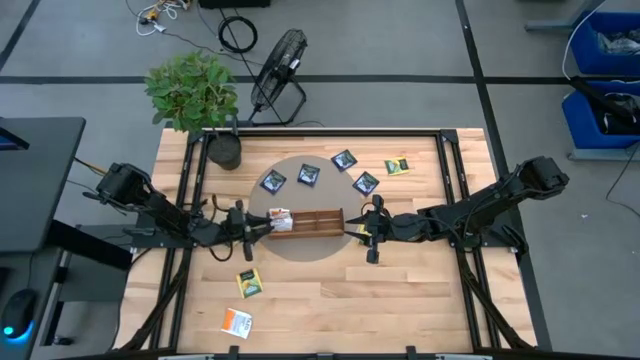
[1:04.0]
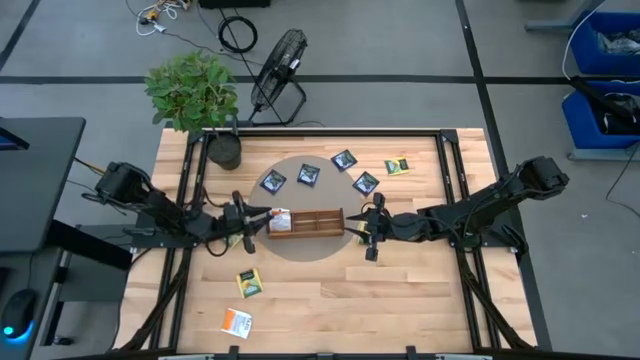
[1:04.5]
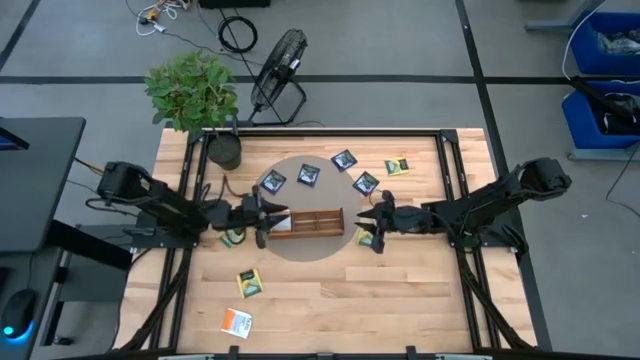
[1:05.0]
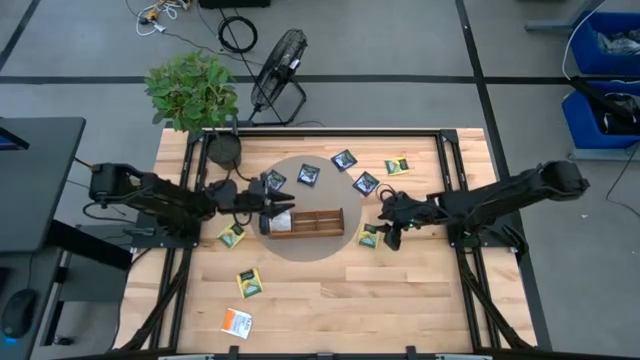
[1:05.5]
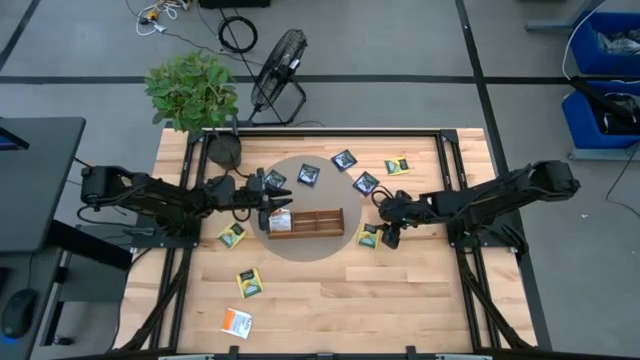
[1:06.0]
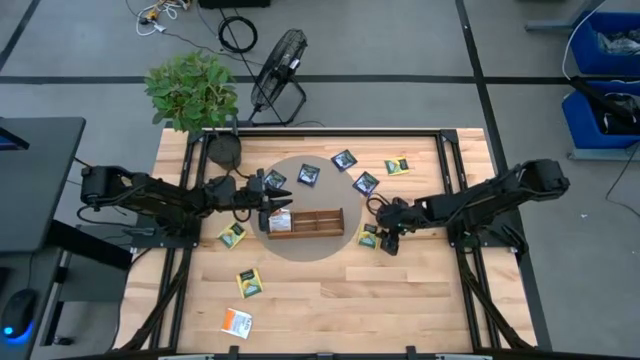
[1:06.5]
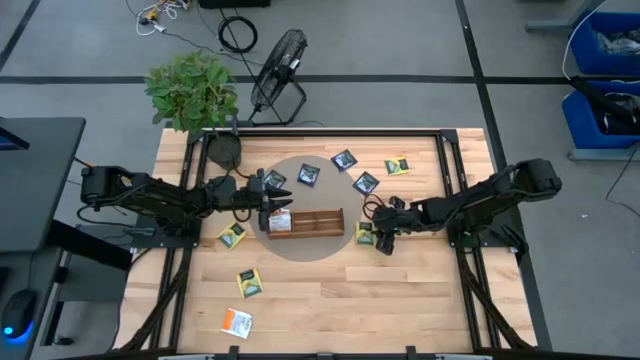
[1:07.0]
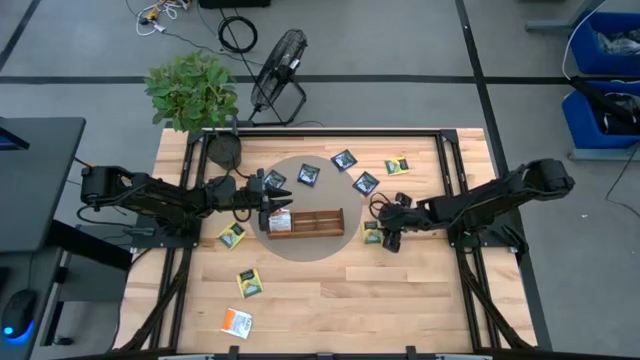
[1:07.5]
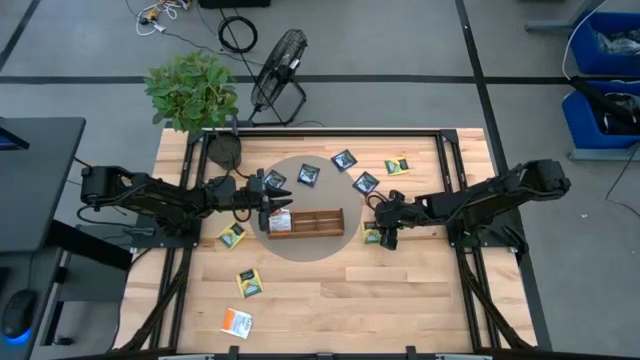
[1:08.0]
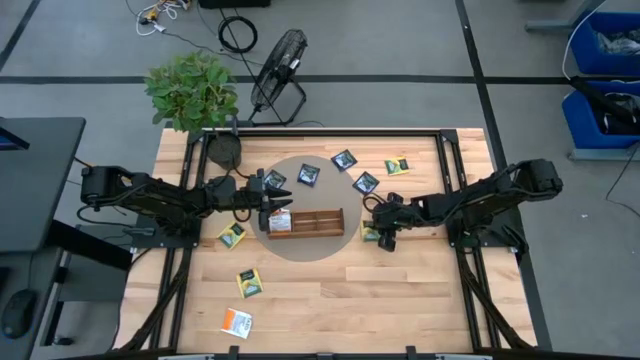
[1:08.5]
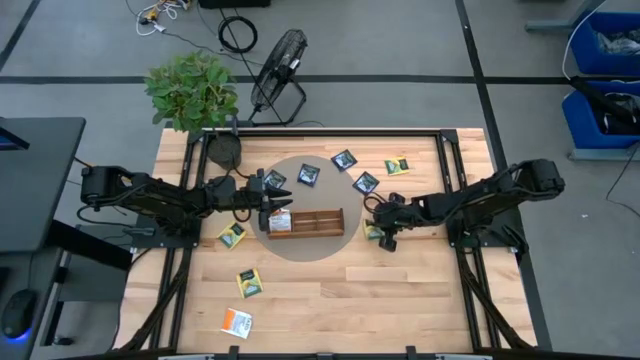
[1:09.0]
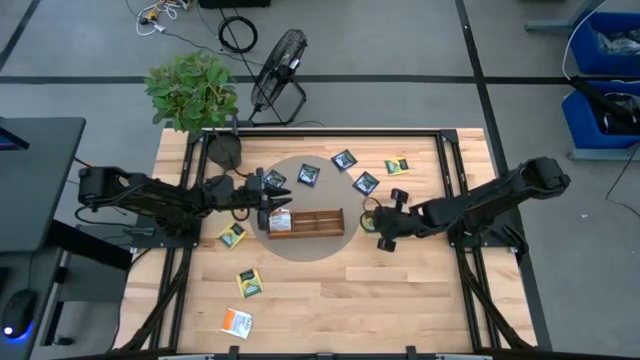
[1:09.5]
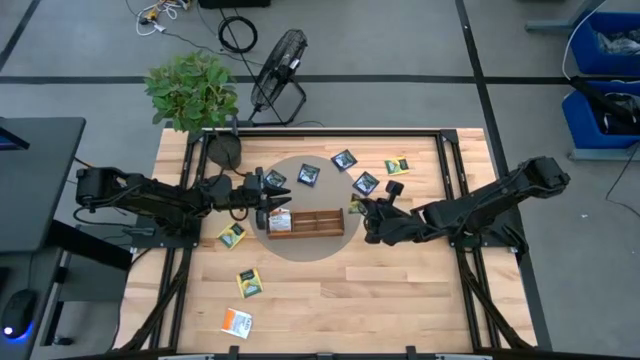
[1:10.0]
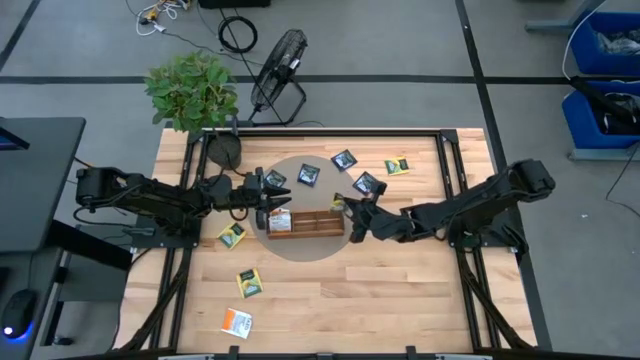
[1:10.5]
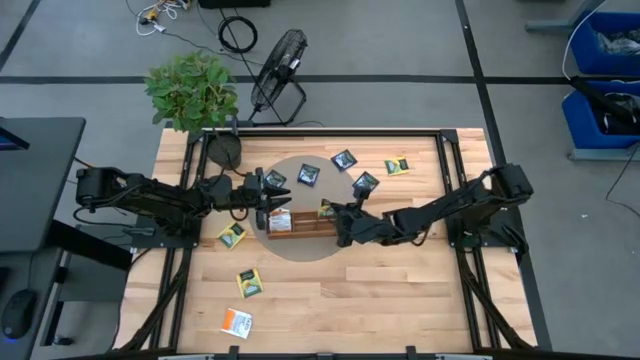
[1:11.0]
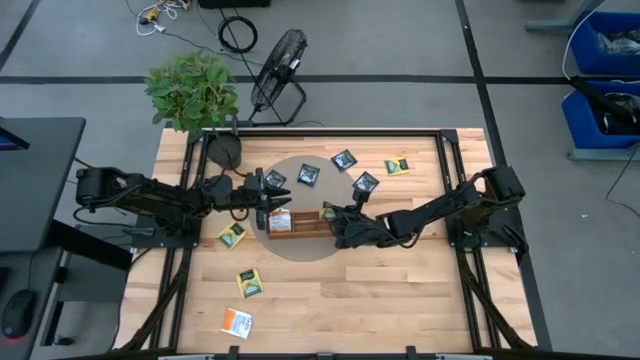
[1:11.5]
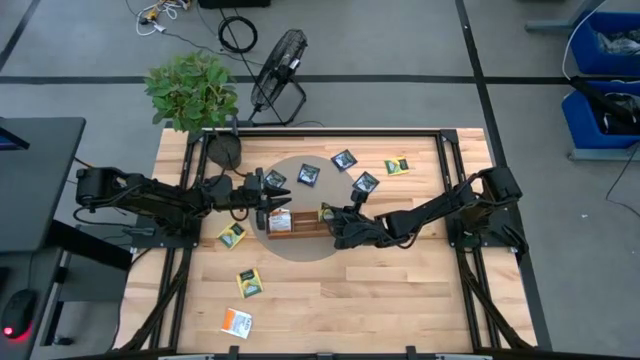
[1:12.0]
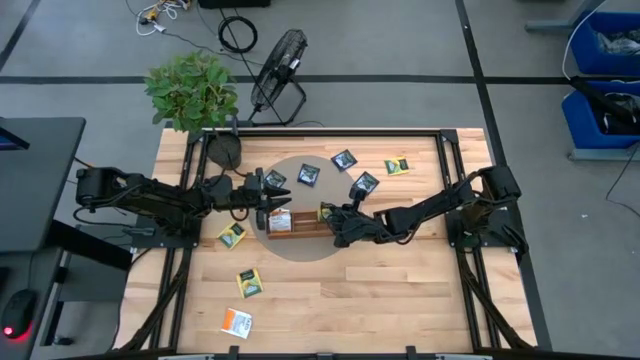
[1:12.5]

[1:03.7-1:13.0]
Task: Pick & Place Tea
Put the yellow tea bag into the right compartment of the wooden organizer

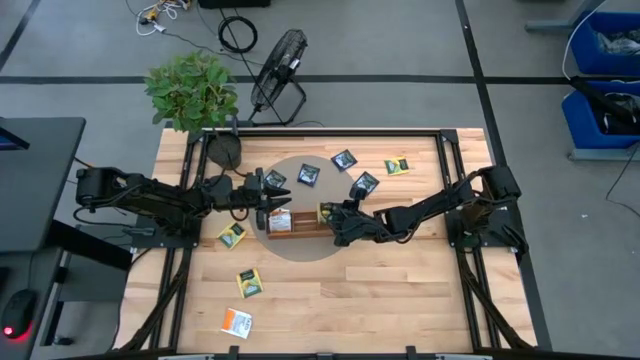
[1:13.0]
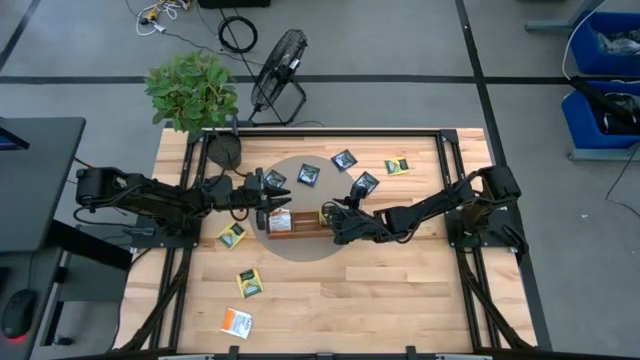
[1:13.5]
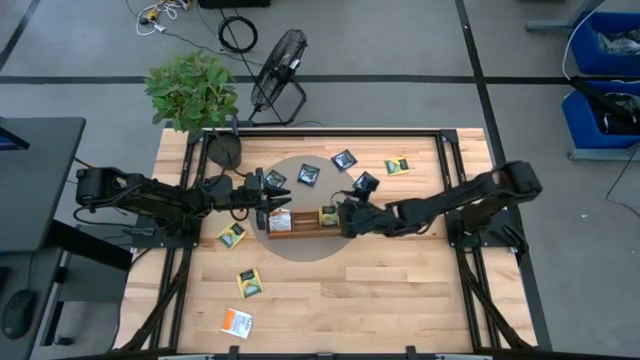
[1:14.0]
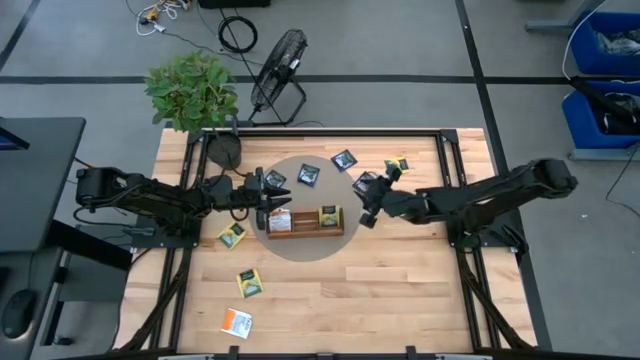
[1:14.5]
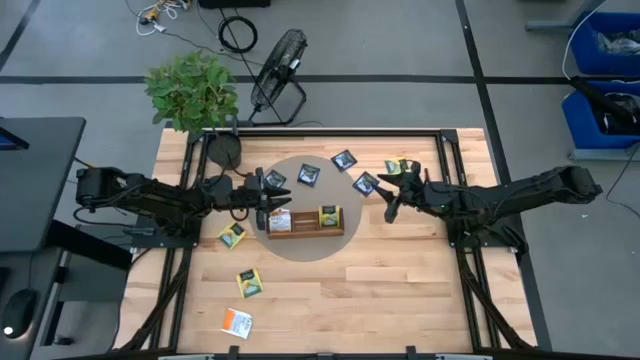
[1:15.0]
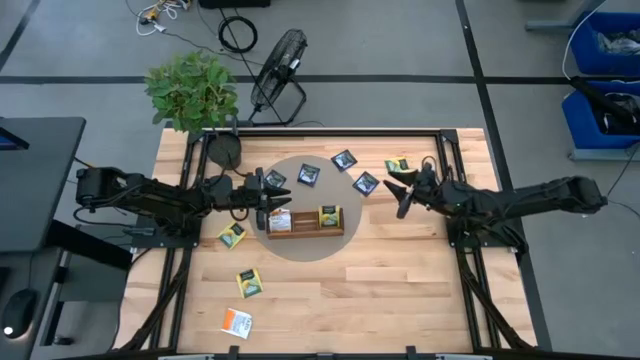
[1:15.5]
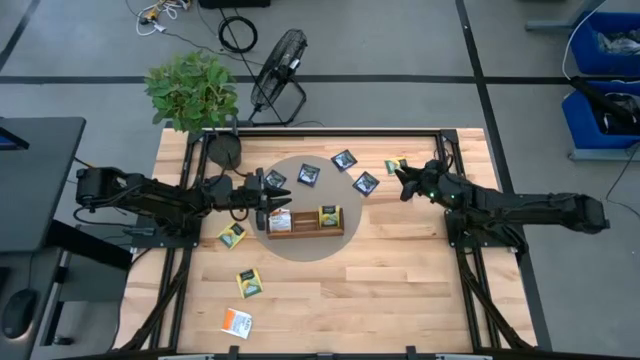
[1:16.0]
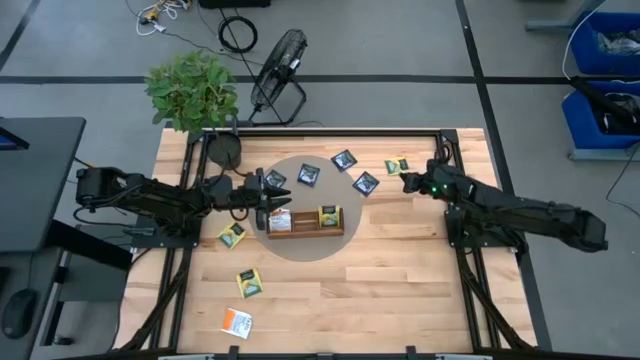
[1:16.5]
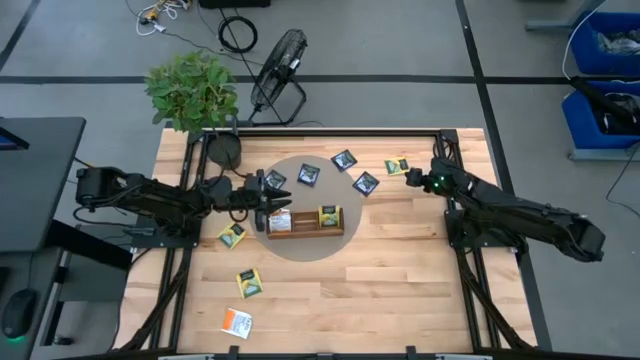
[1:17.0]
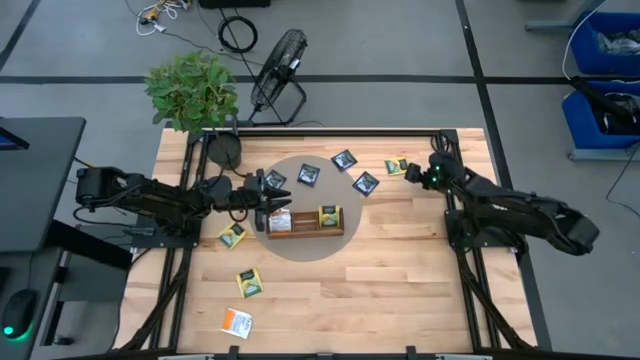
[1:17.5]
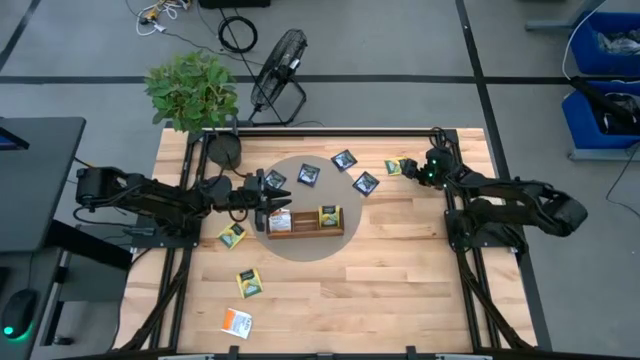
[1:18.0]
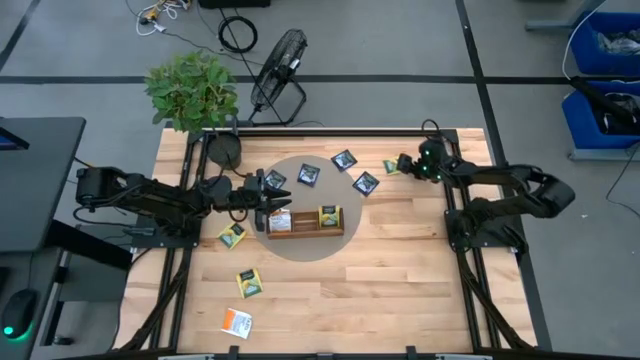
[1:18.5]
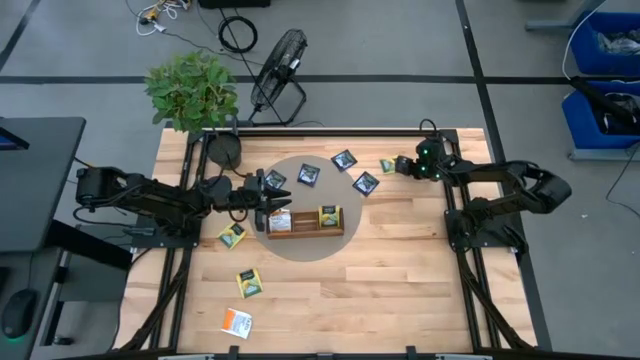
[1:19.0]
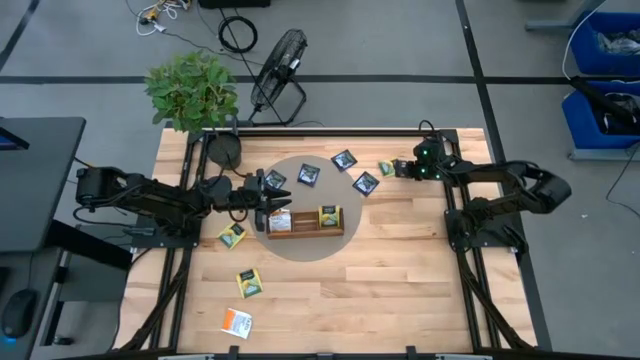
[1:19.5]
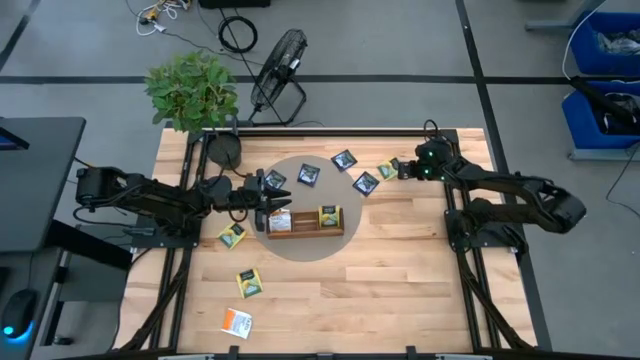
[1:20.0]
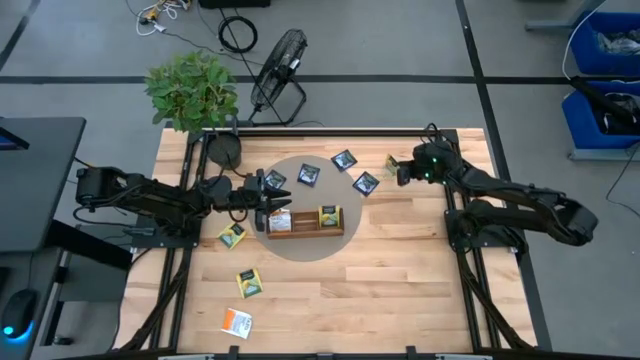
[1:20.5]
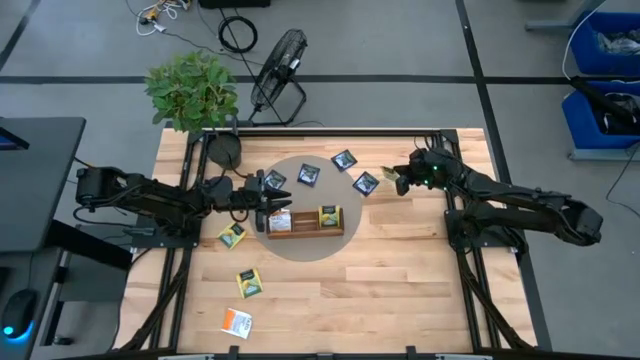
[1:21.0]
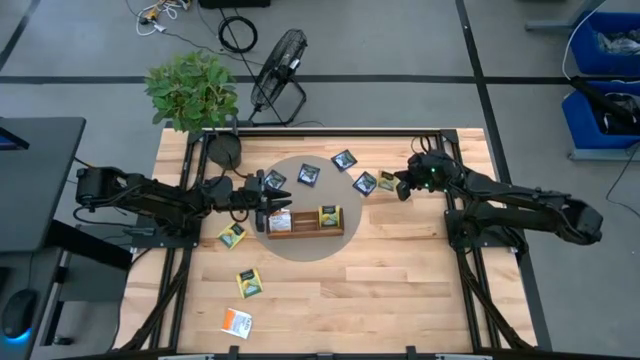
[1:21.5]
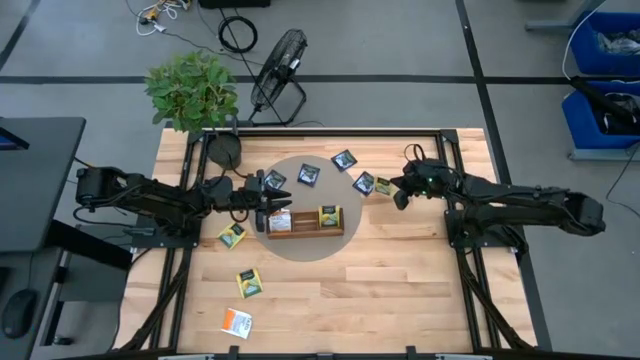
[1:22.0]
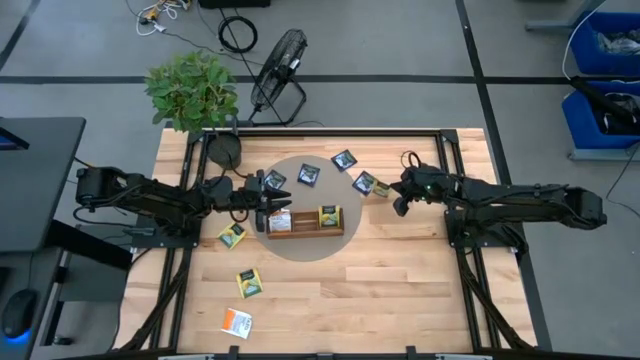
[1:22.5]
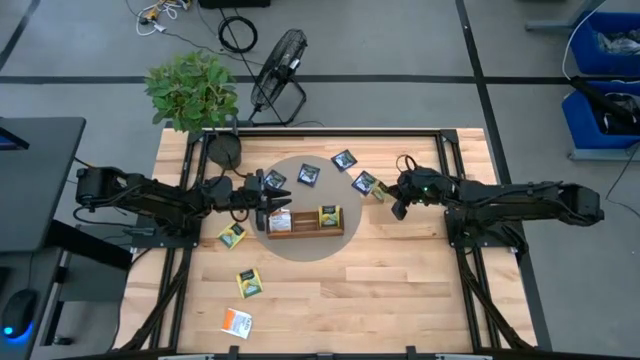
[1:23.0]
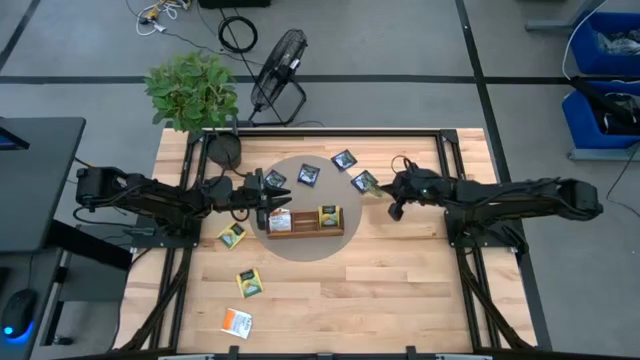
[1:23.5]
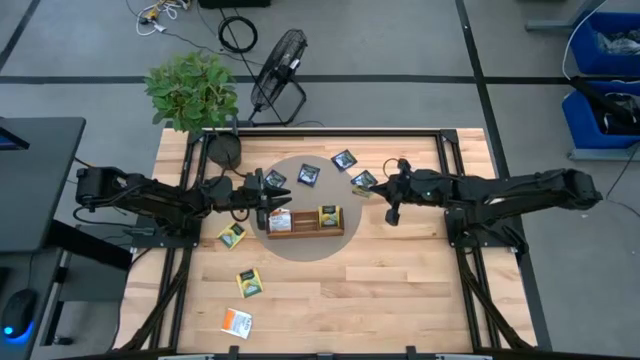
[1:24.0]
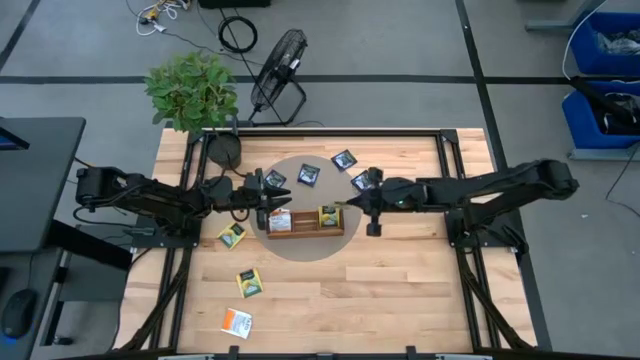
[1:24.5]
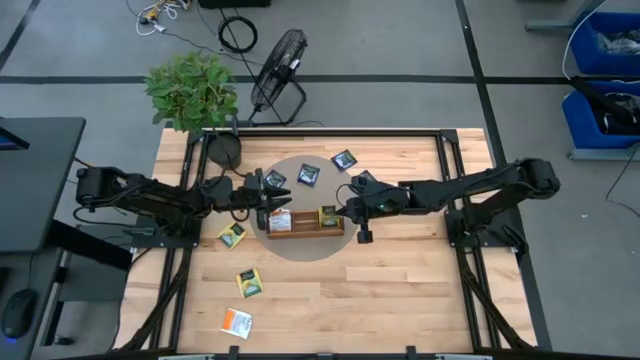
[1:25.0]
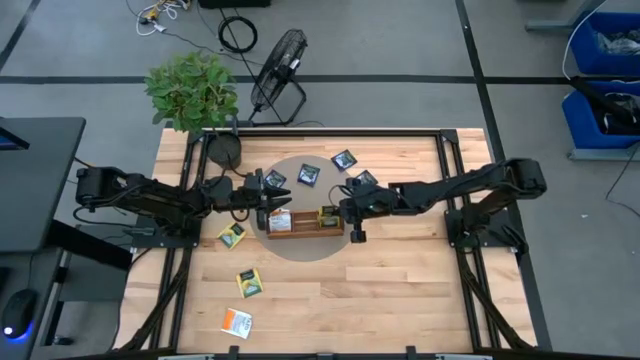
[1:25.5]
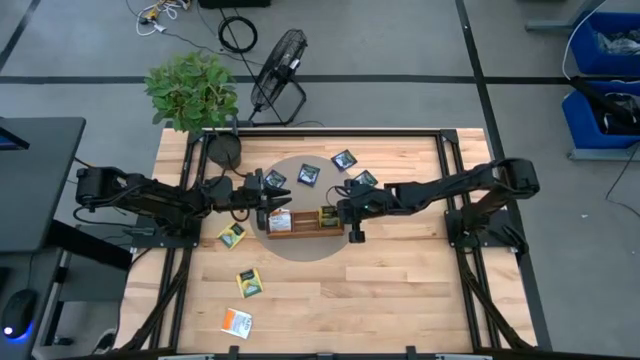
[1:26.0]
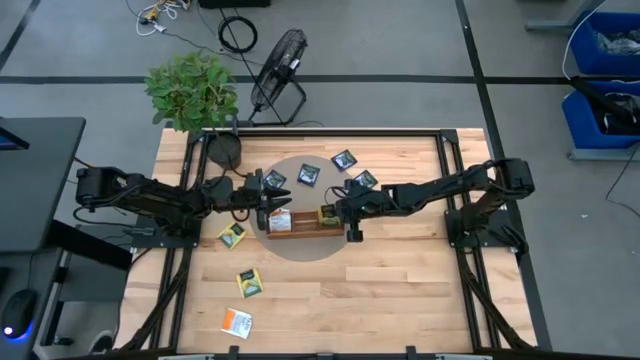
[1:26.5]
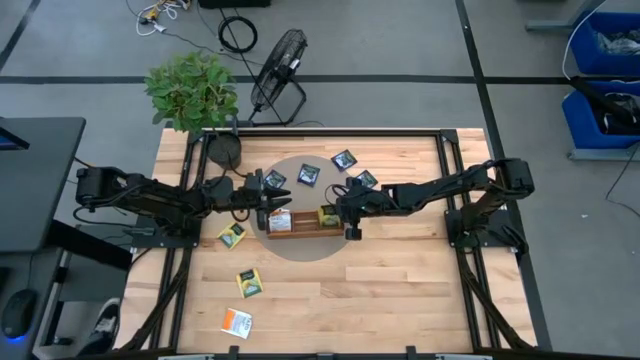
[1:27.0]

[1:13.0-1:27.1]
Put the top right yellow tea bag into the right compartment of the wooden organizer
